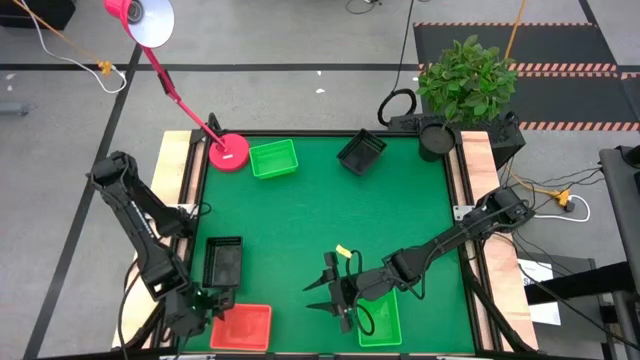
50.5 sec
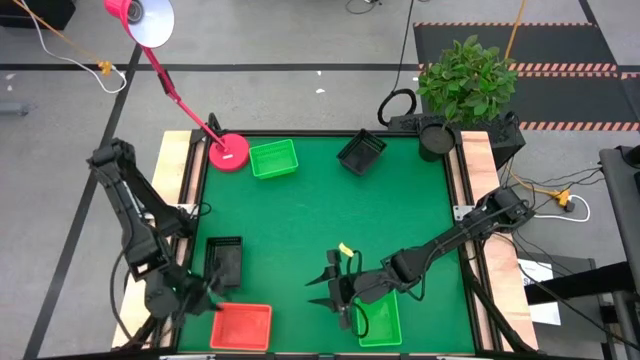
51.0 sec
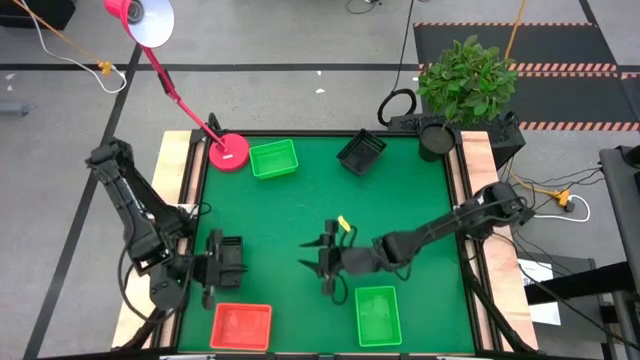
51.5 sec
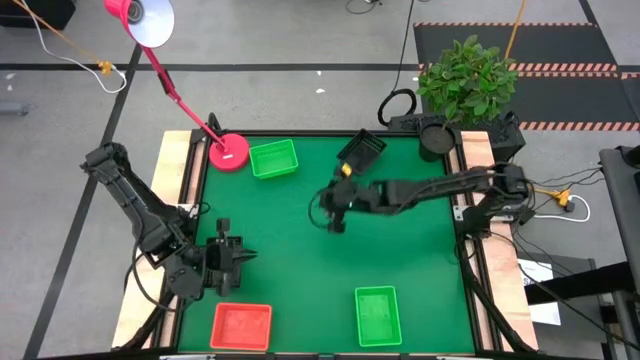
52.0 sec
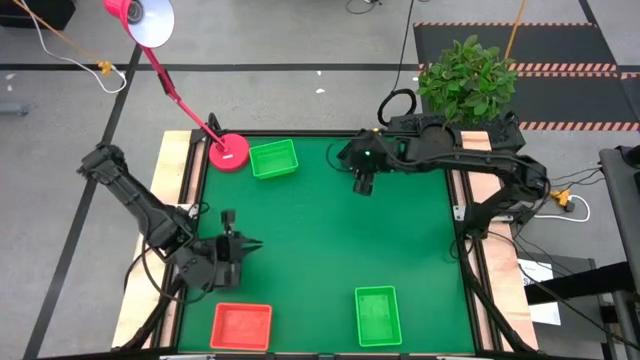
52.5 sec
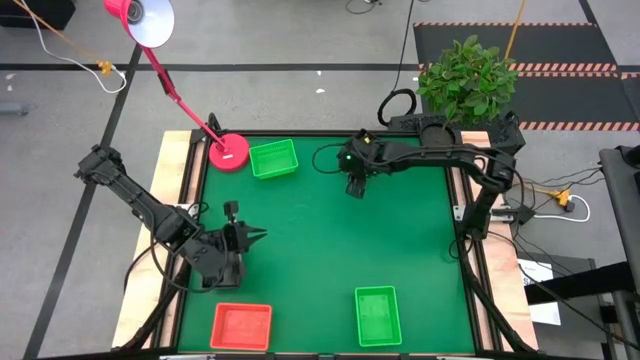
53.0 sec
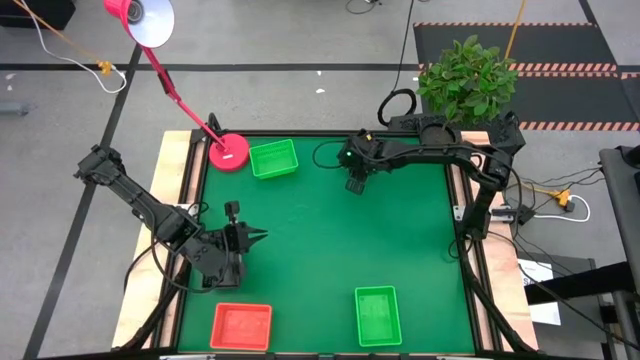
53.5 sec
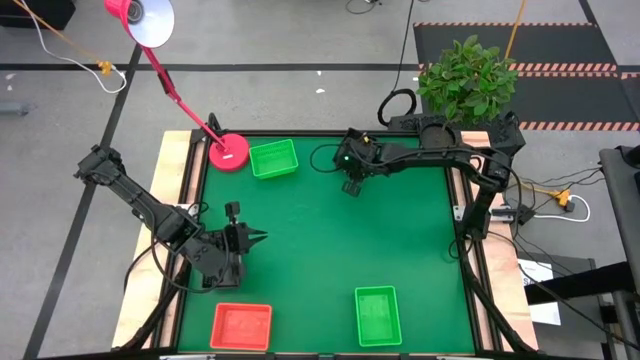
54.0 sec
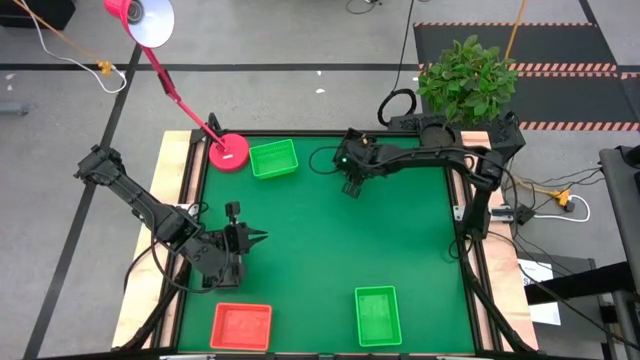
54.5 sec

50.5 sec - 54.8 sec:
Stack the black bin on the black bin

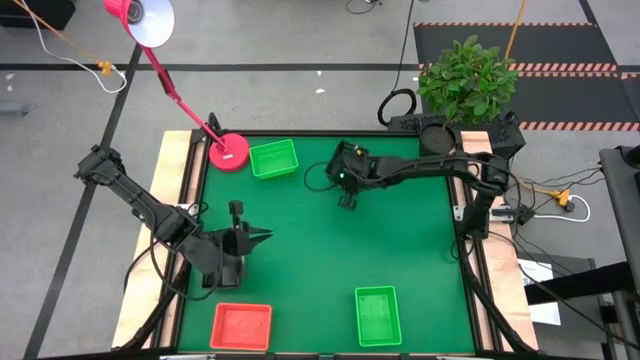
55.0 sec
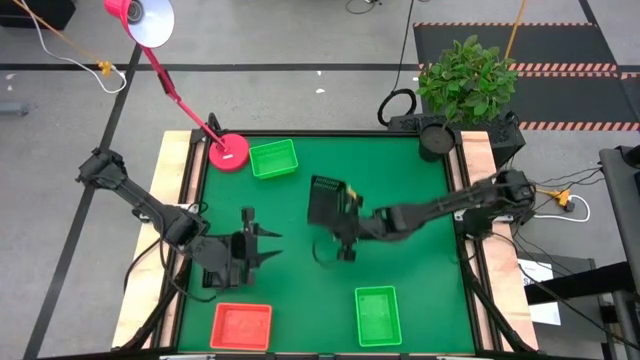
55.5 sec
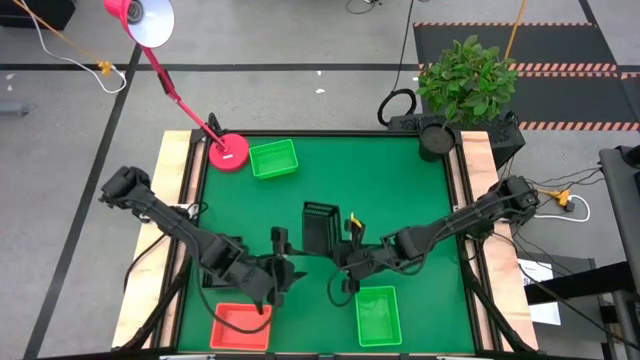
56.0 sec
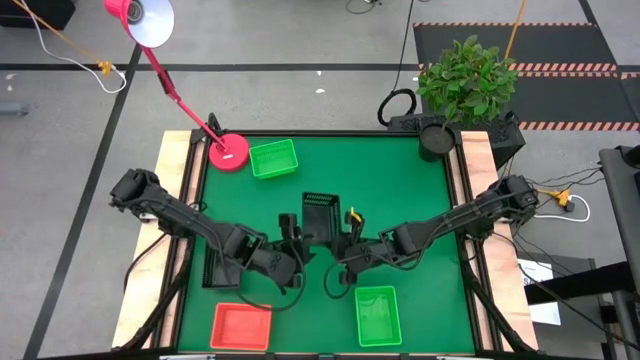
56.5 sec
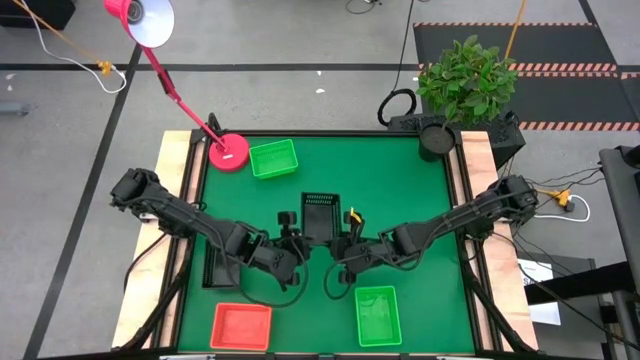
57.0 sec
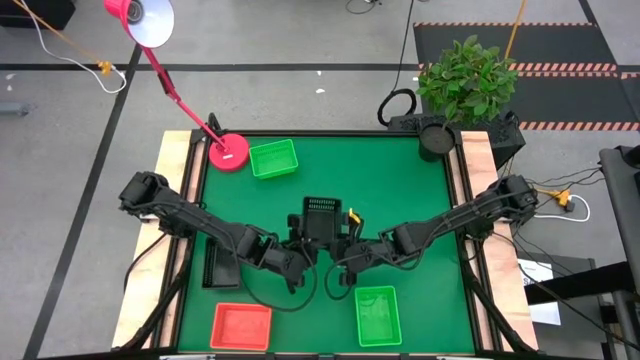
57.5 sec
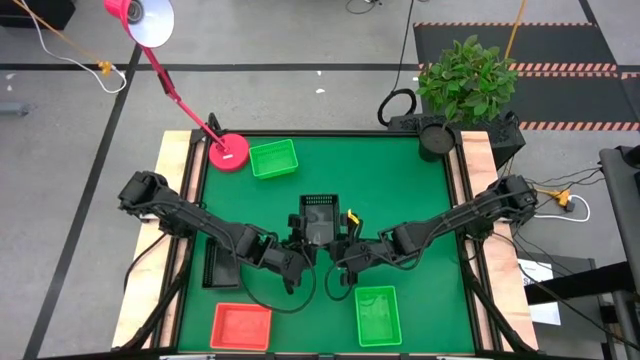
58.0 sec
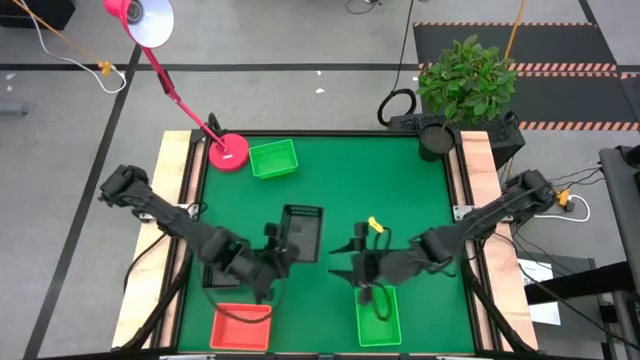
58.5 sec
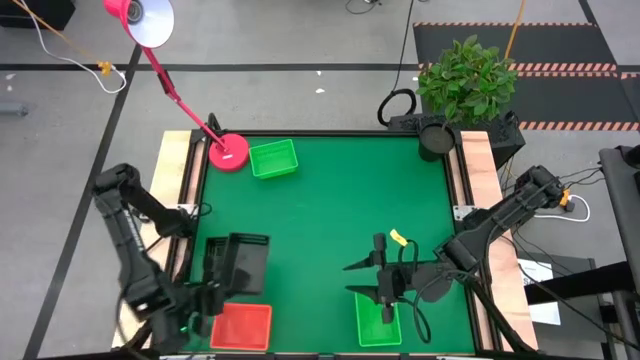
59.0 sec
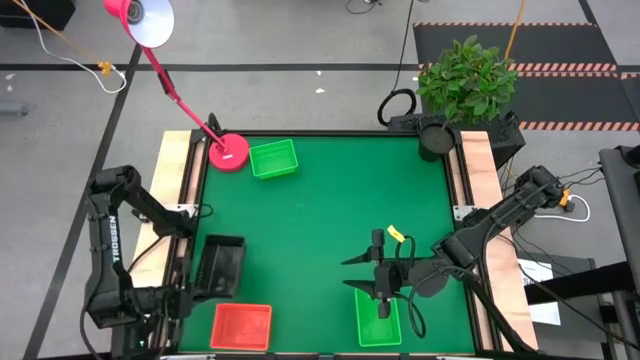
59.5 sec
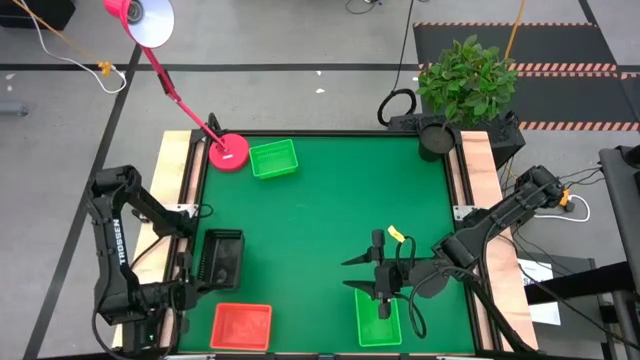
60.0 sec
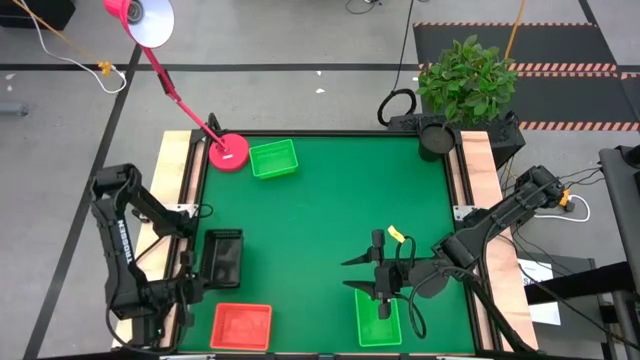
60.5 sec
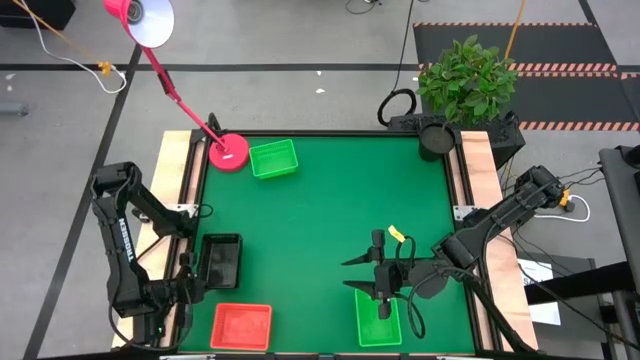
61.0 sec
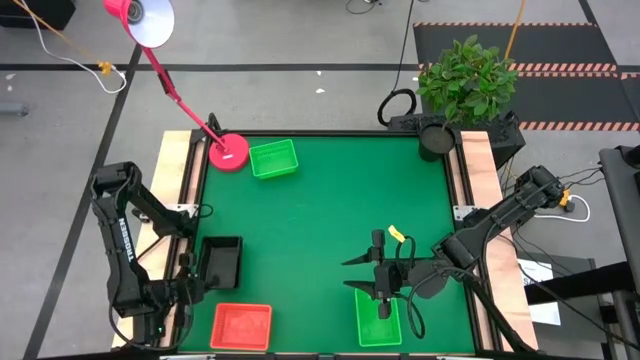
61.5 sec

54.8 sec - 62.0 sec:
Stack the top black bin on the bottom black bin

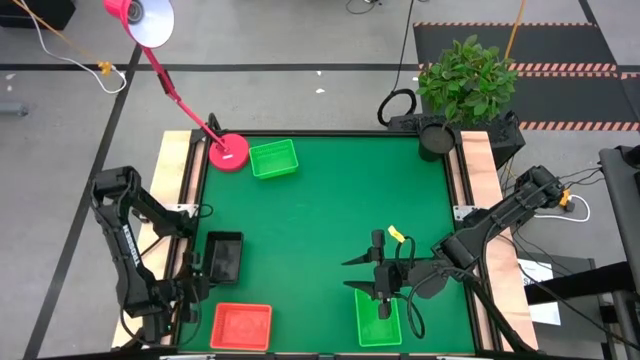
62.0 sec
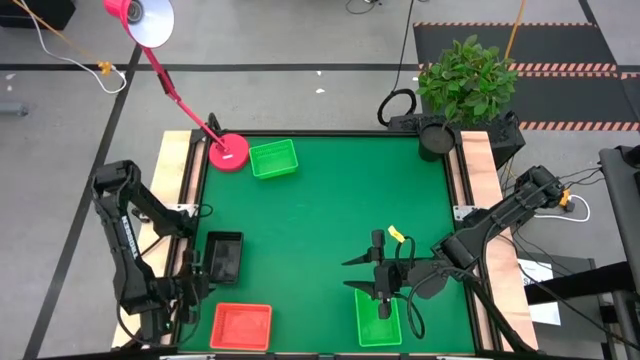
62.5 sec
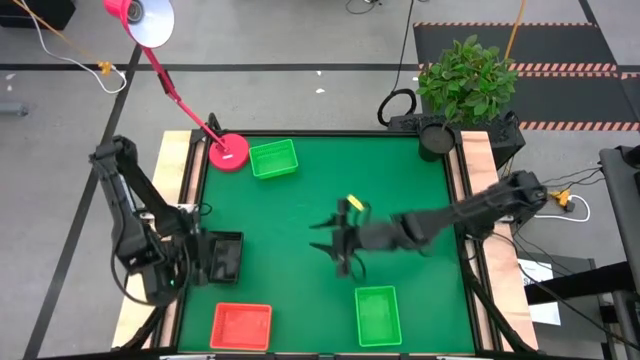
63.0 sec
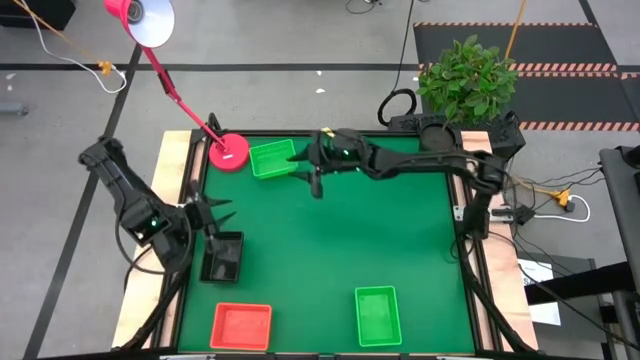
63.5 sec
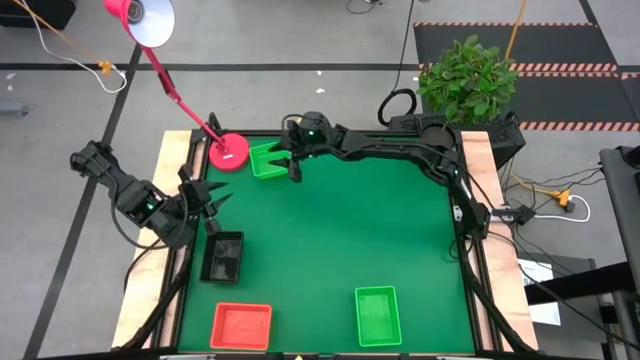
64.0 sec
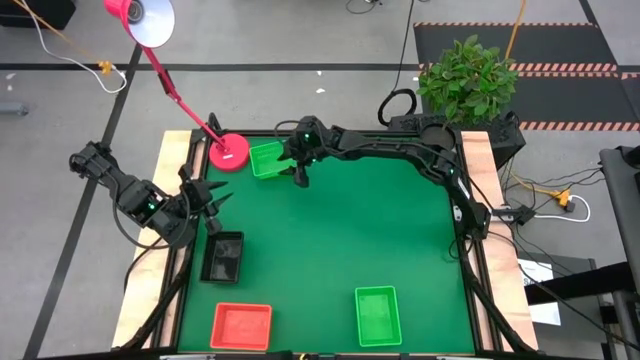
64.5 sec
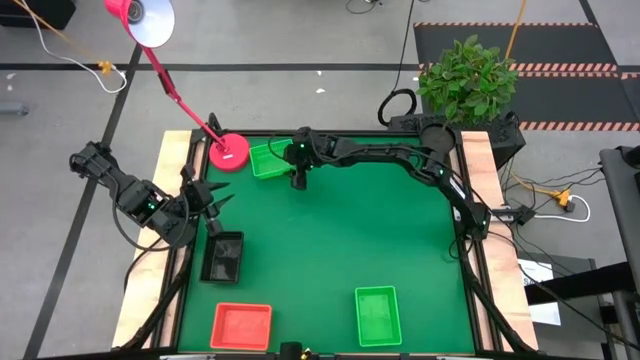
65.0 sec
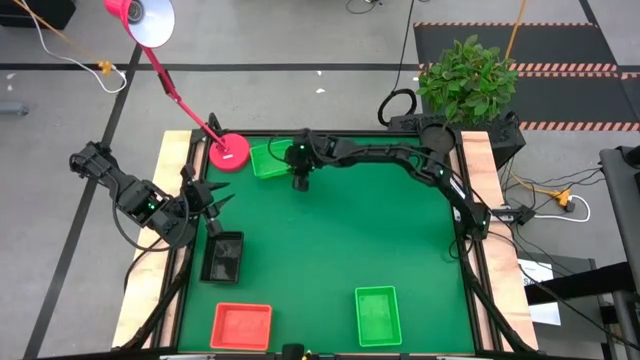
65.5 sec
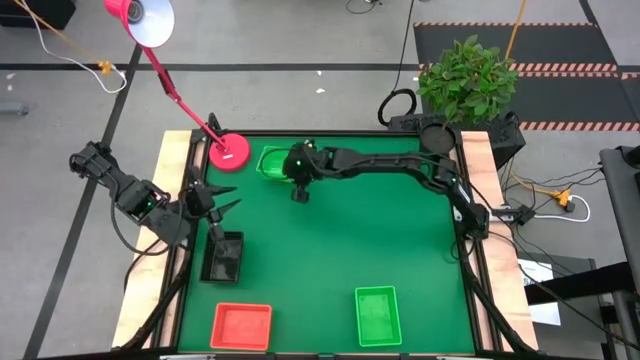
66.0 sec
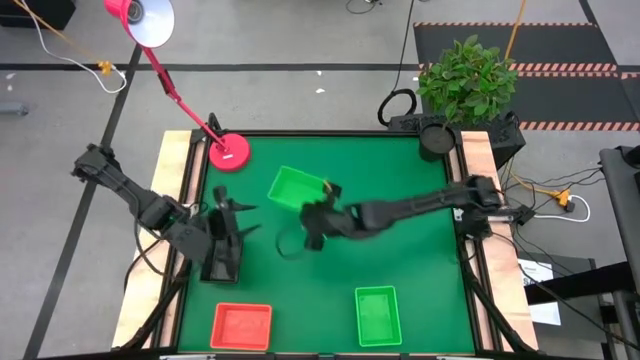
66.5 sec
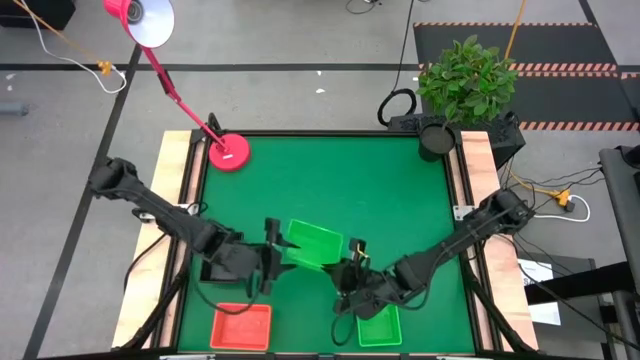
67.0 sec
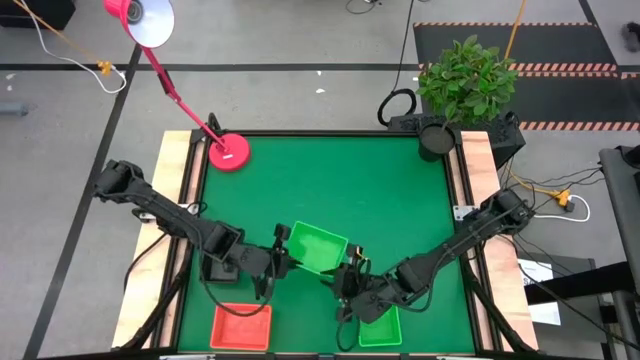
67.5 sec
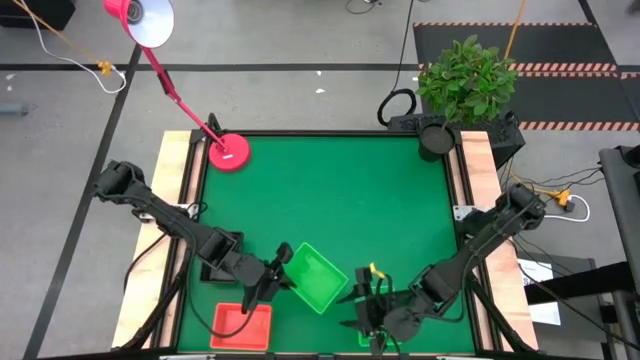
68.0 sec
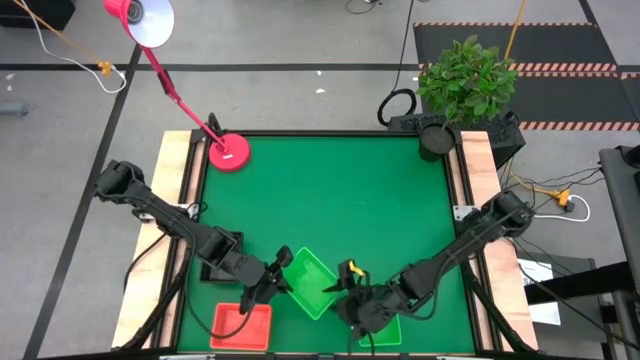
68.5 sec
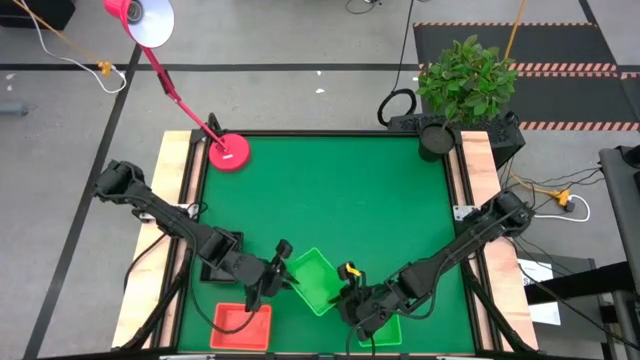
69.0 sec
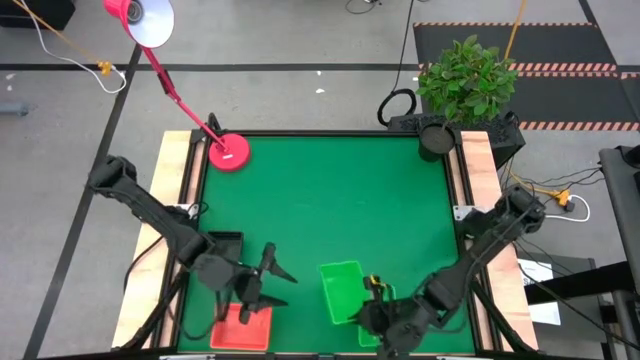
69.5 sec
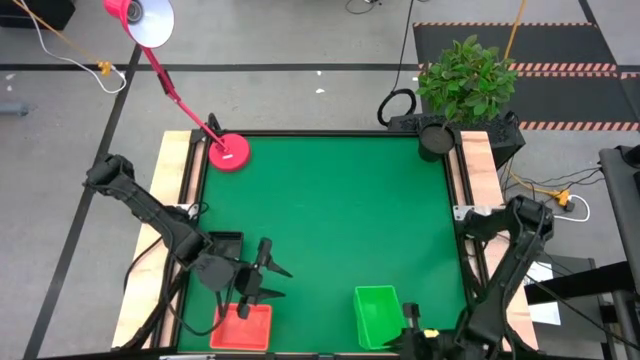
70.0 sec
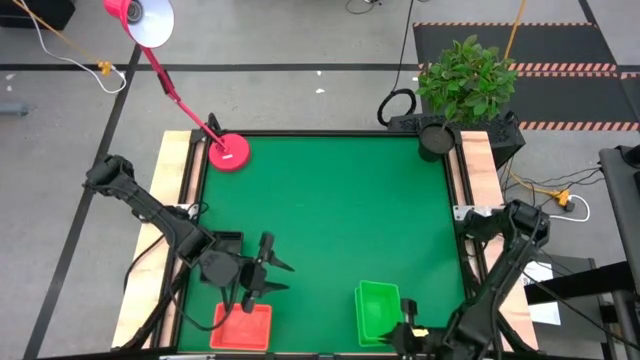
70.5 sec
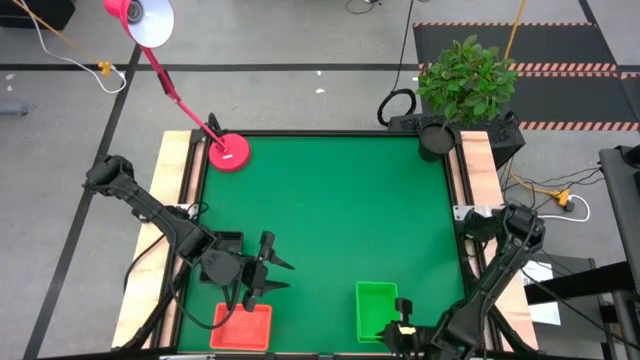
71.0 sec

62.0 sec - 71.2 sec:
Stack the top green bin on the bottom green bin
